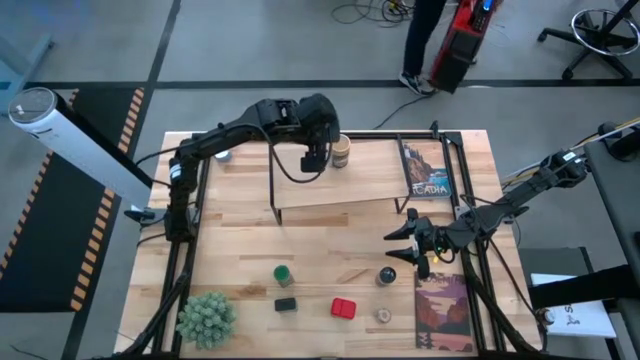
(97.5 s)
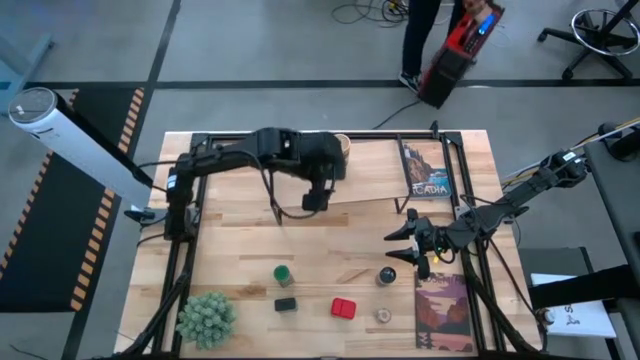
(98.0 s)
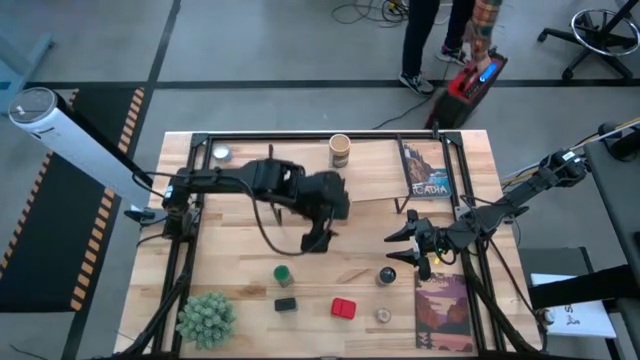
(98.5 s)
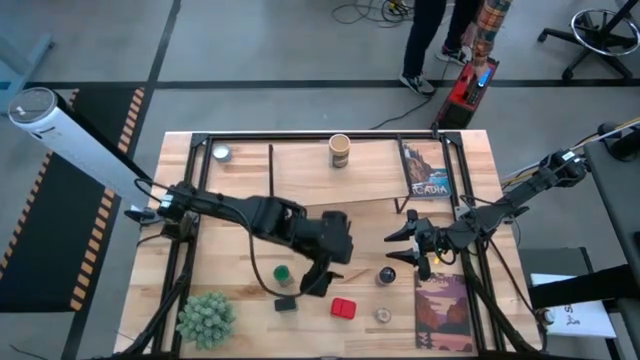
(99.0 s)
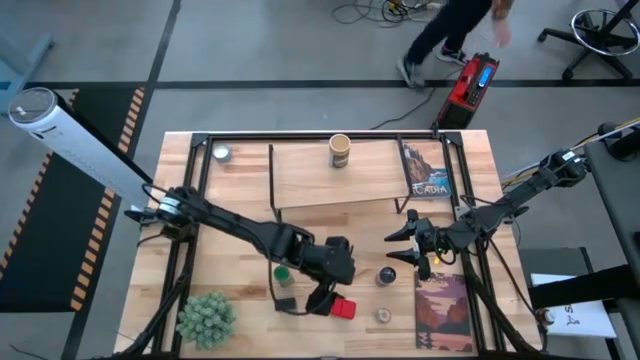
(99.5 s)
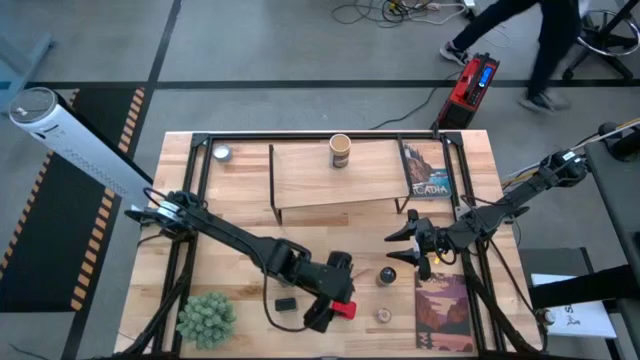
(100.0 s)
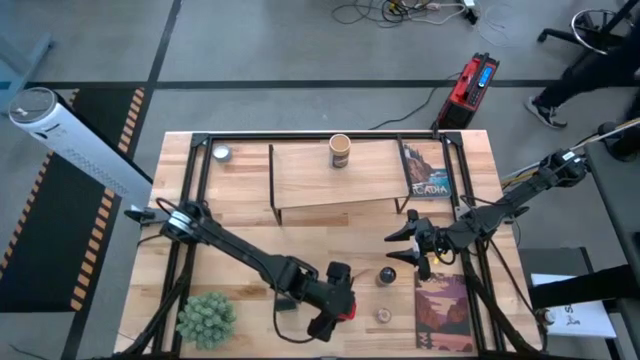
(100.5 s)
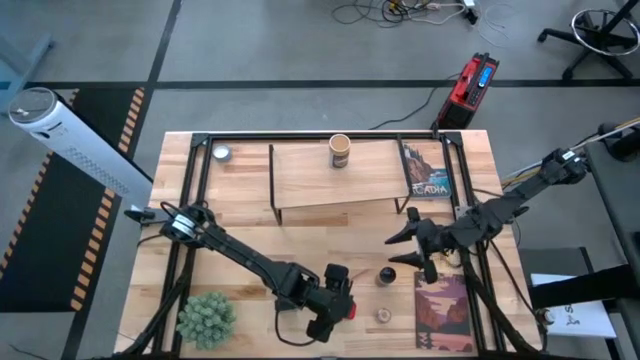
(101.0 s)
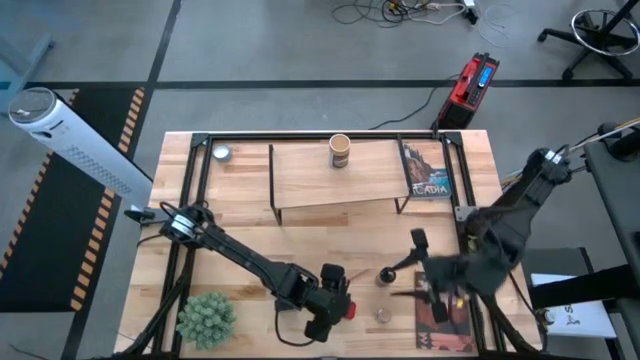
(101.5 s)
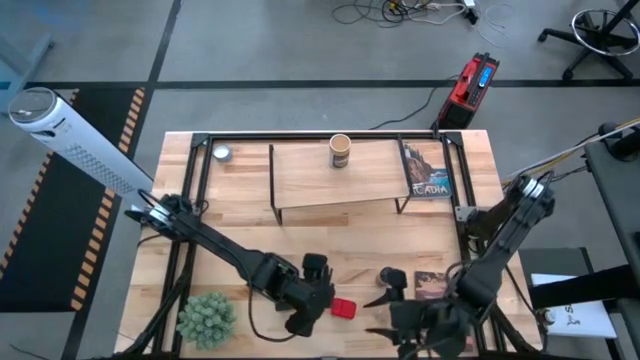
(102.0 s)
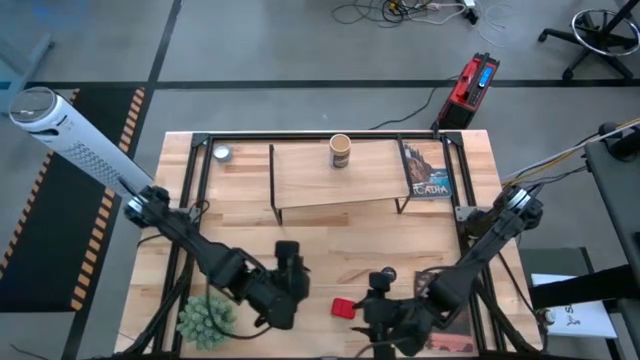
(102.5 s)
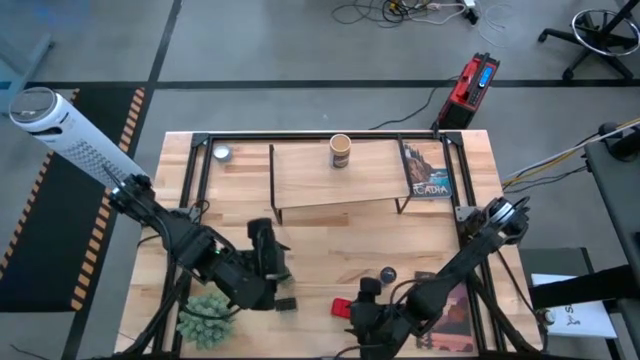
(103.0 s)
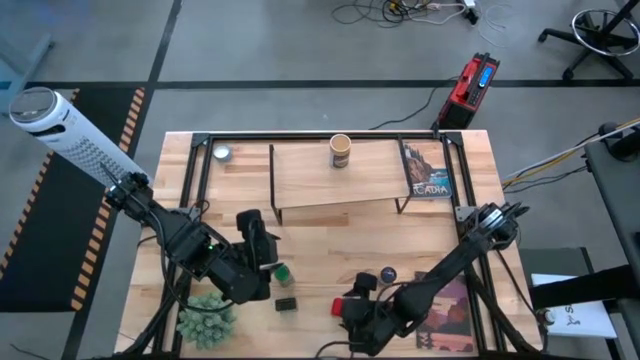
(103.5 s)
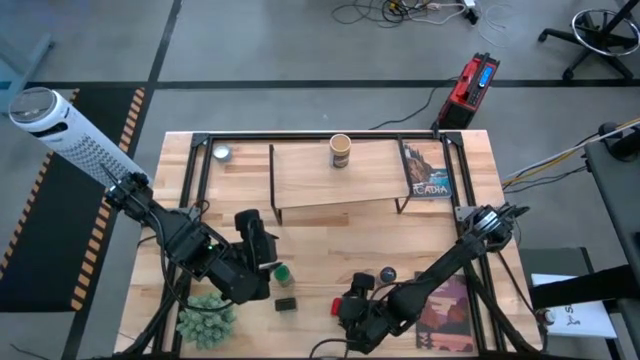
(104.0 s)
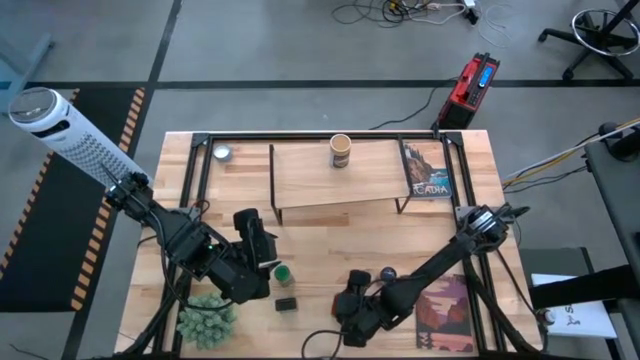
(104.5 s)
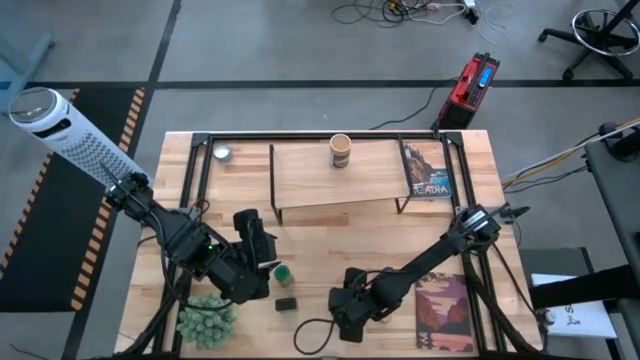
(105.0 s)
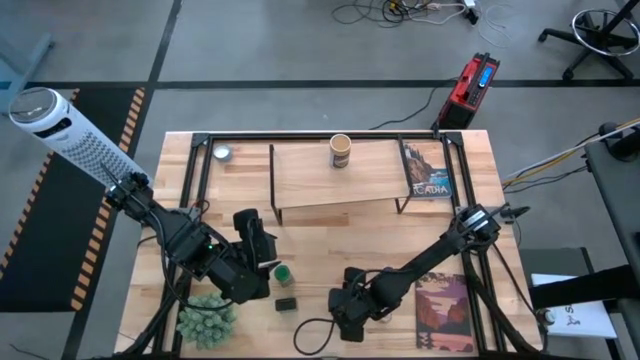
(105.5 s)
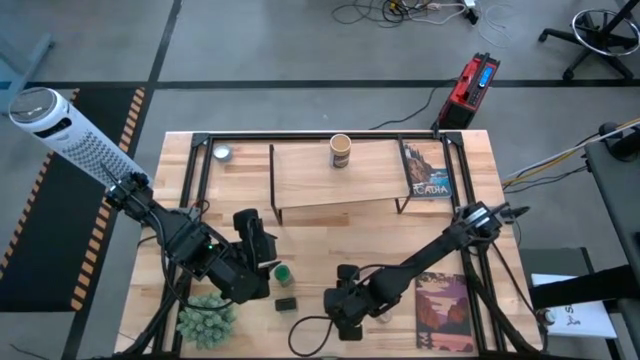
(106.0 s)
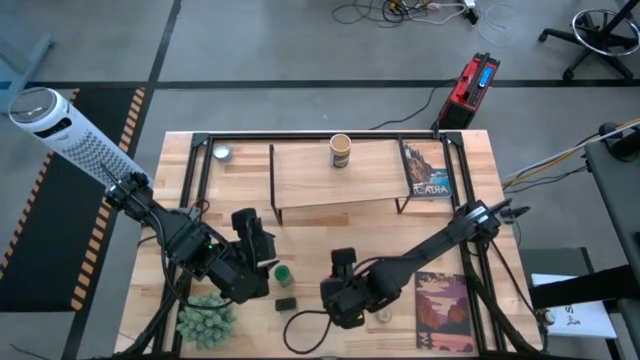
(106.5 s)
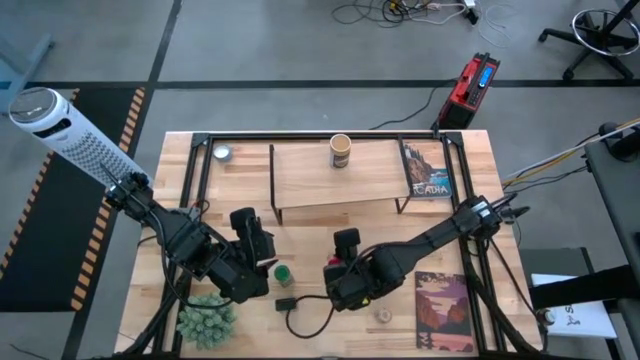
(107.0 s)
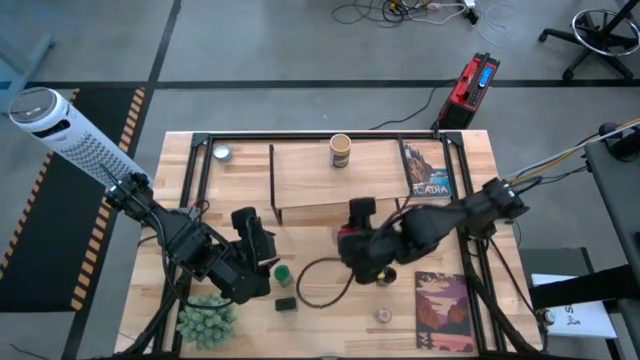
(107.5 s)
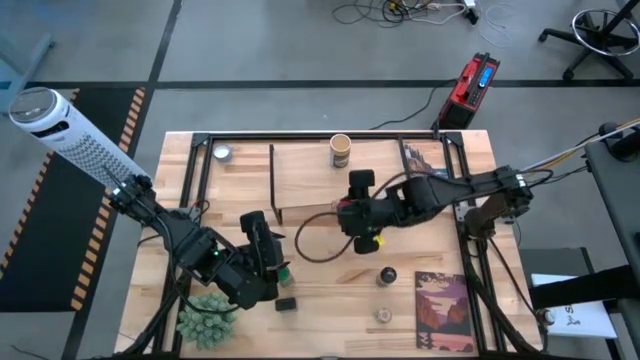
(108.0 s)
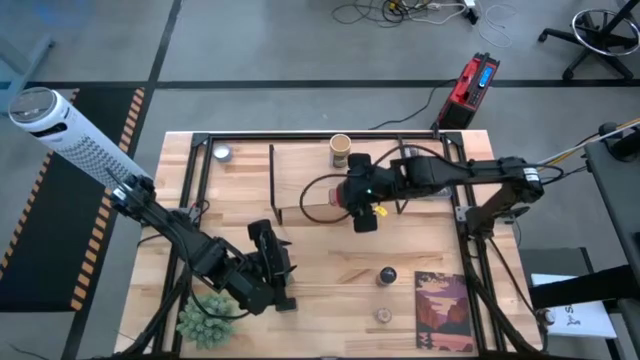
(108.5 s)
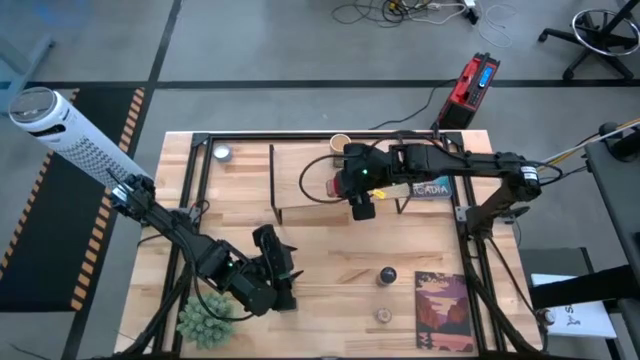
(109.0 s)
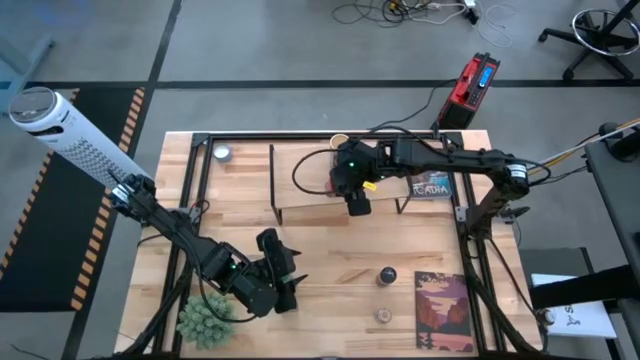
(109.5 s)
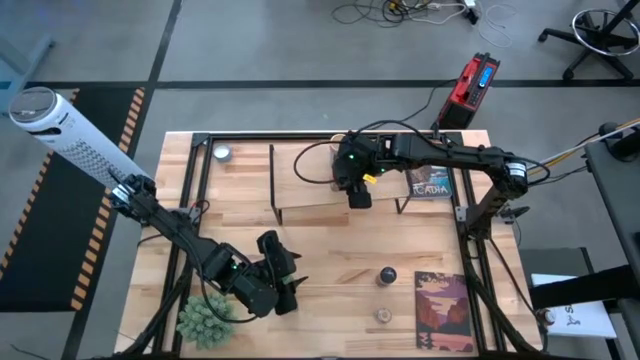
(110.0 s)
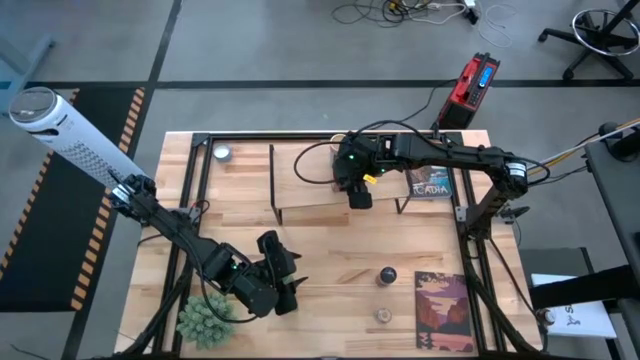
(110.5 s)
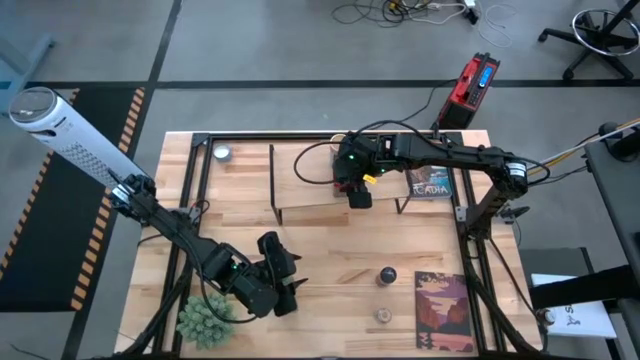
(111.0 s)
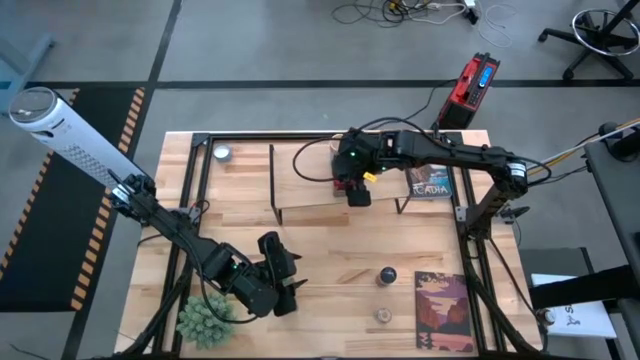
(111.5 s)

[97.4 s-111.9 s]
Task: Shelf spices
Put the red seasoning can on the shelf

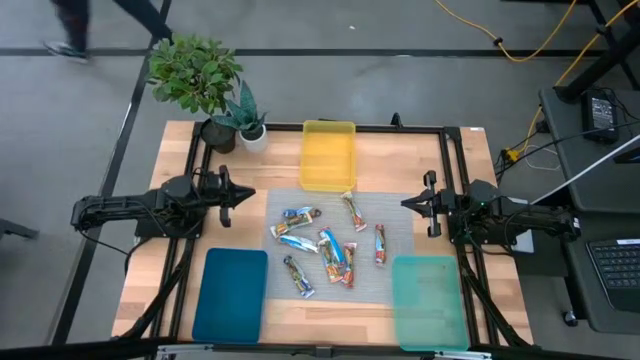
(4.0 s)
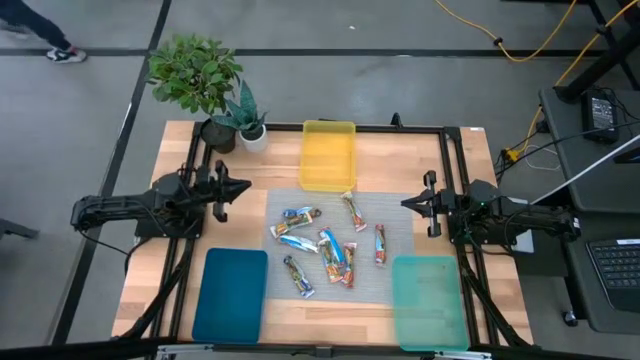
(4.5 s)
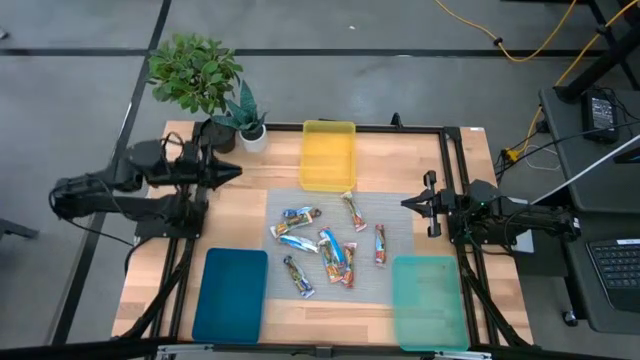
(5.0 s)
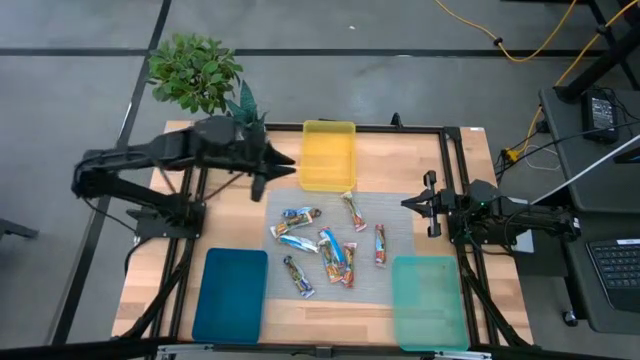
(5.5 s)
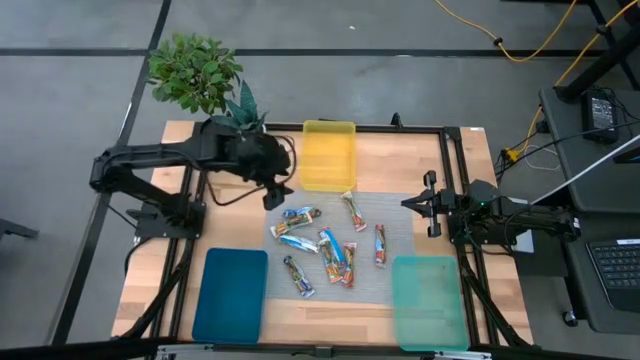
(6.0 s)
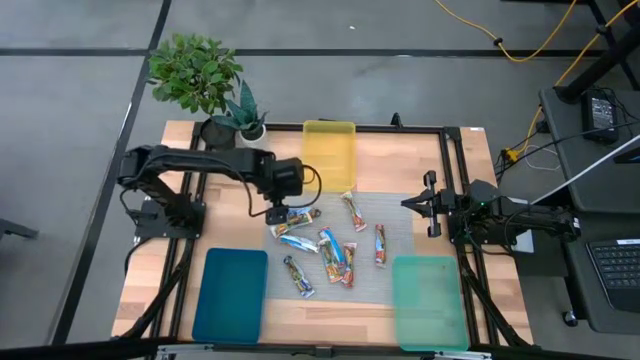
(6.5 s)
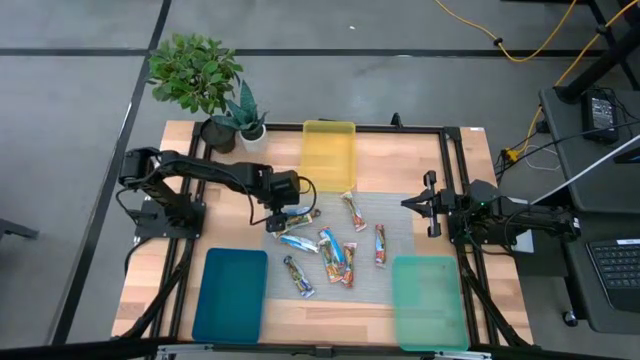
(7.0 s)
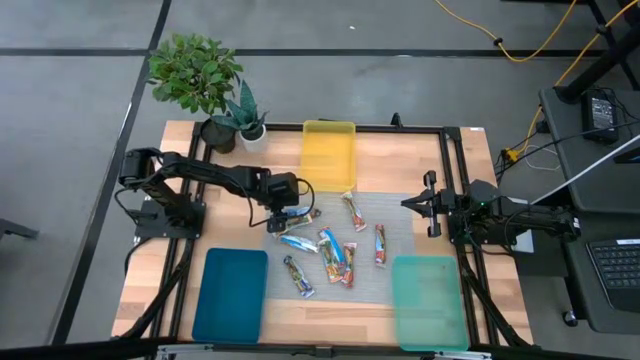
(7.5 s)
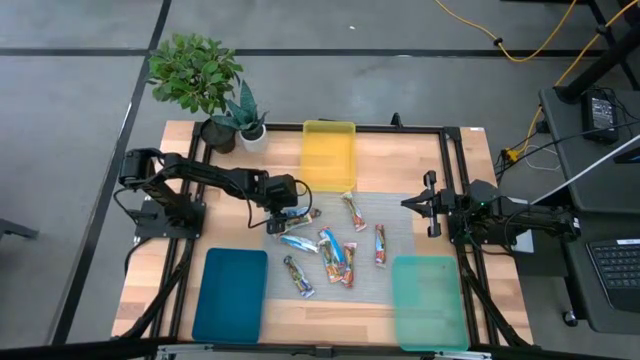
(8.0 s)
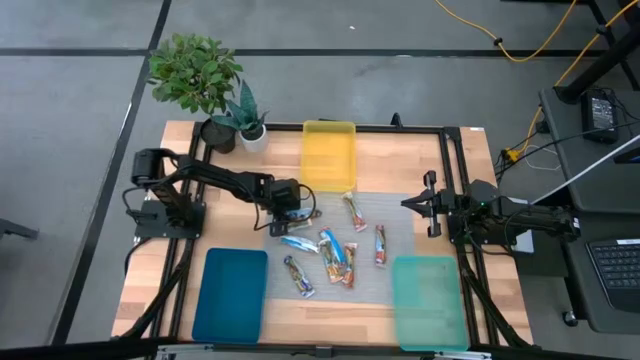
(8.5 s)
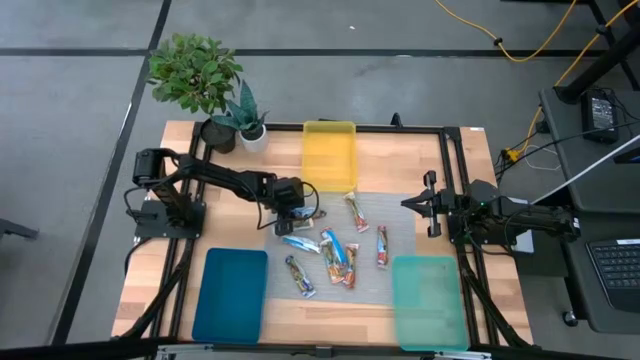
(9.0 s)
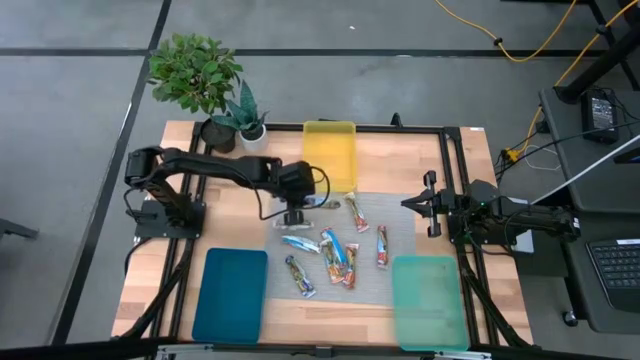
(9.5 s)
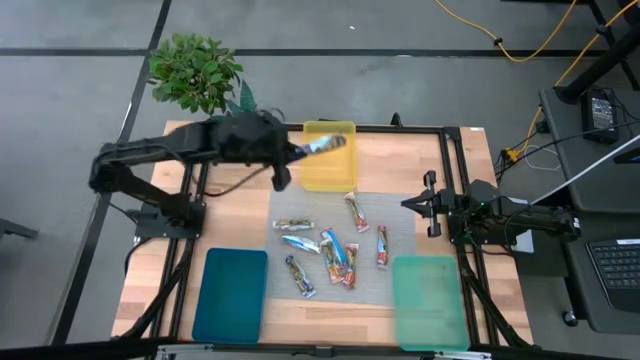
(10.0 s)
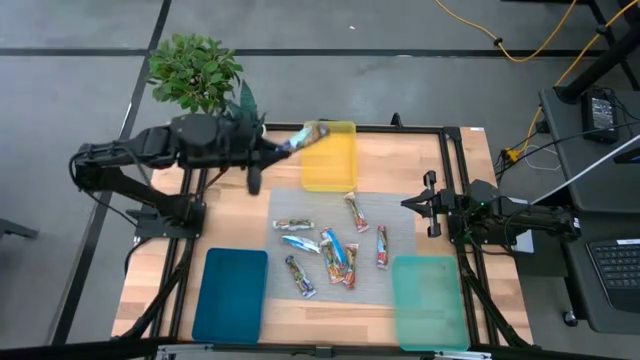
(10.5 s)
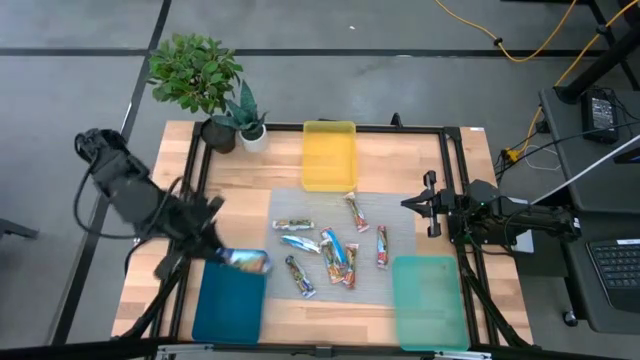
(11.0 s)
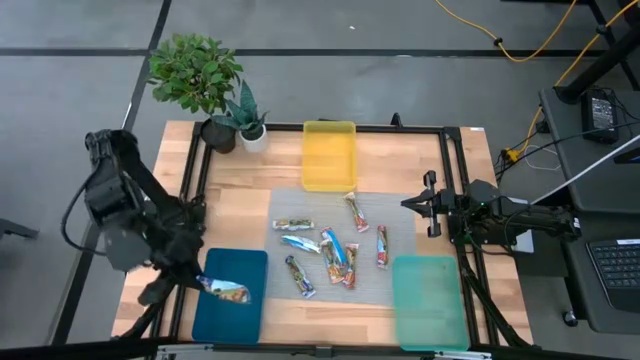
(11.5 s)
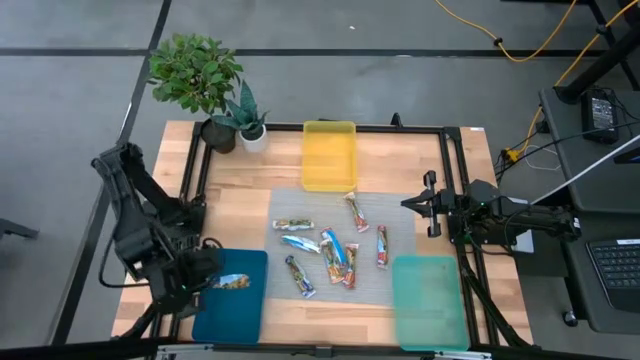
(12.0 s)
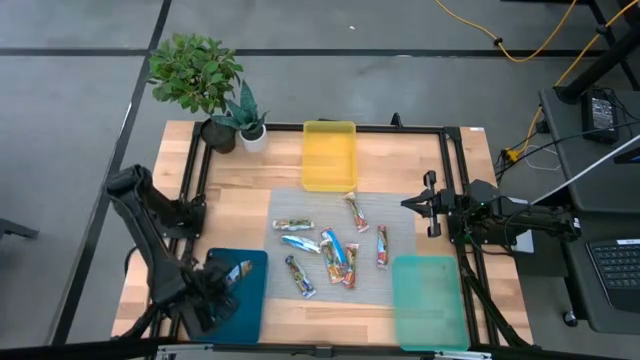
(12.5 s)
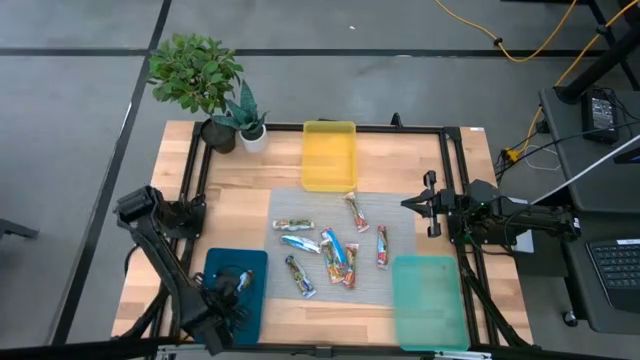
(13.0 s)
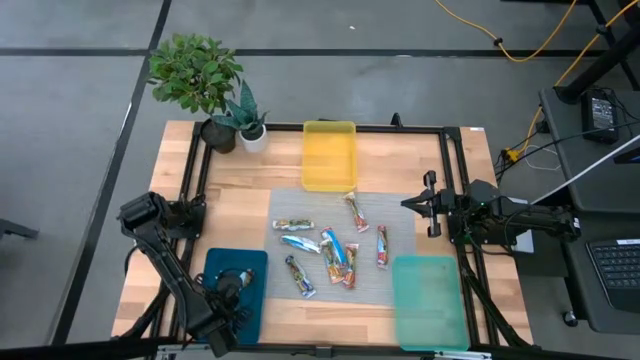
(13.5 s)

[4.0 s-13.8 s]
Task: Pick and place Granola Bars by type
Put the top blue granola bar into the blue bin
